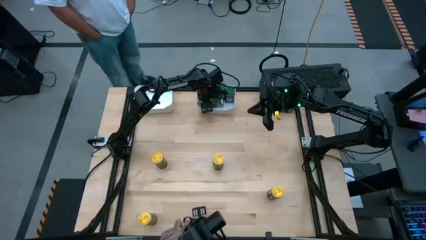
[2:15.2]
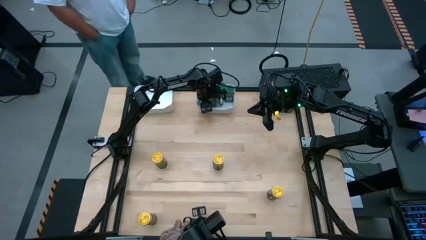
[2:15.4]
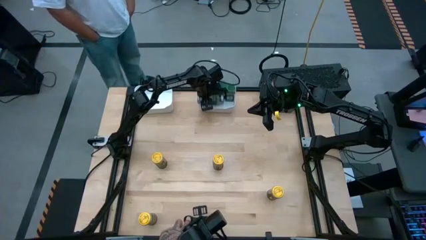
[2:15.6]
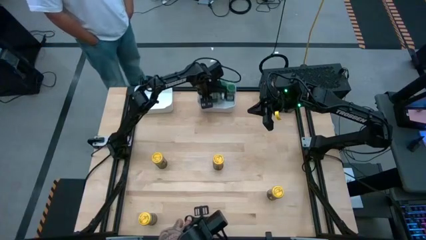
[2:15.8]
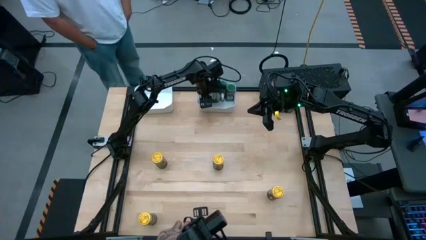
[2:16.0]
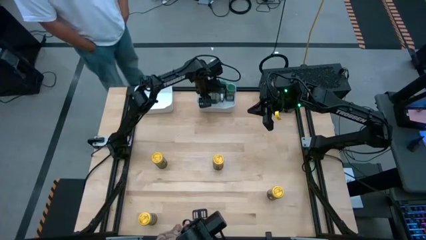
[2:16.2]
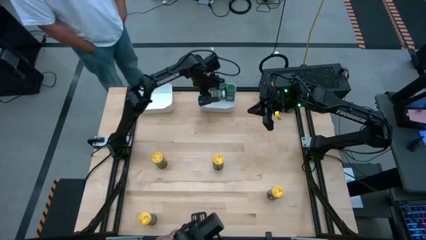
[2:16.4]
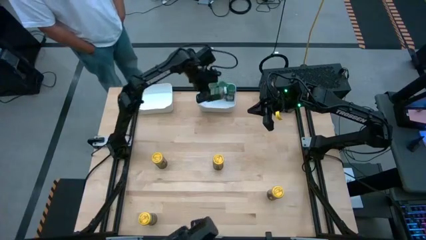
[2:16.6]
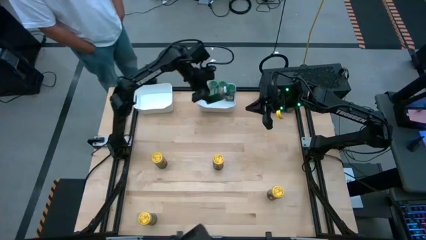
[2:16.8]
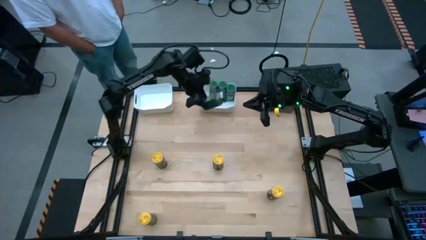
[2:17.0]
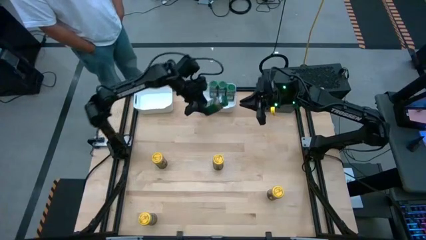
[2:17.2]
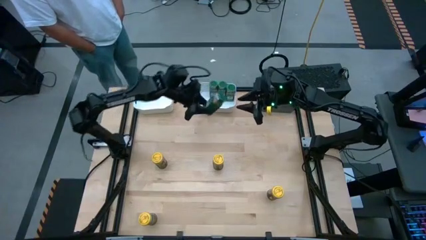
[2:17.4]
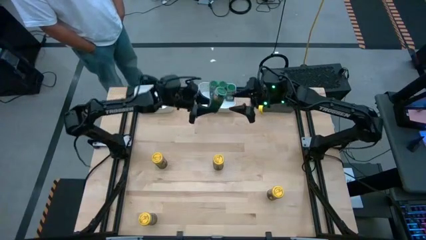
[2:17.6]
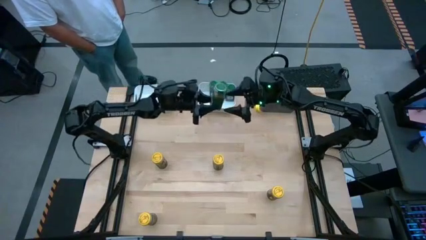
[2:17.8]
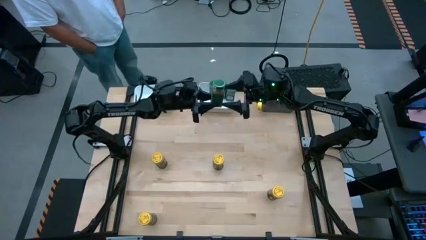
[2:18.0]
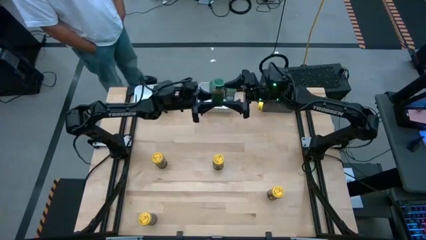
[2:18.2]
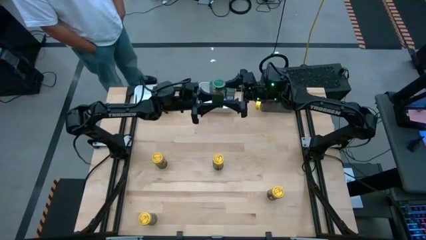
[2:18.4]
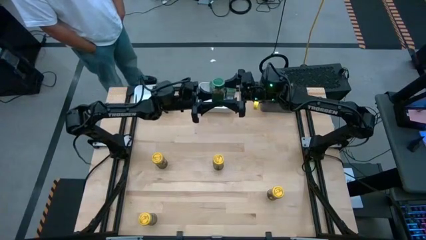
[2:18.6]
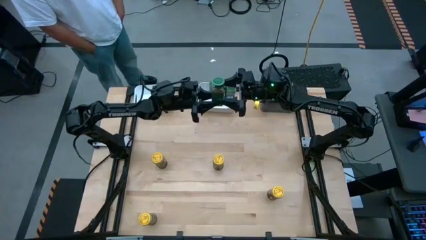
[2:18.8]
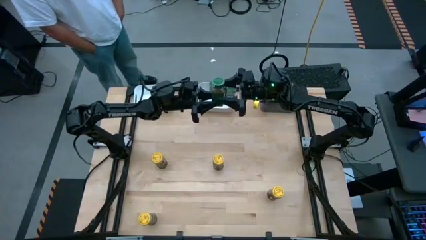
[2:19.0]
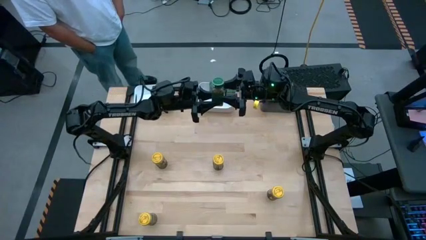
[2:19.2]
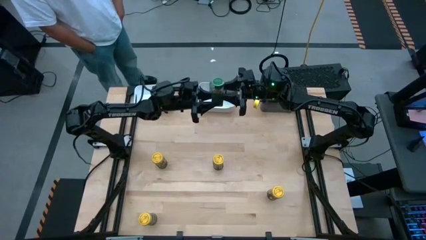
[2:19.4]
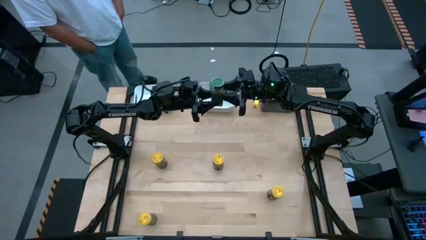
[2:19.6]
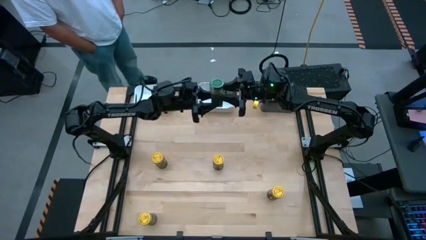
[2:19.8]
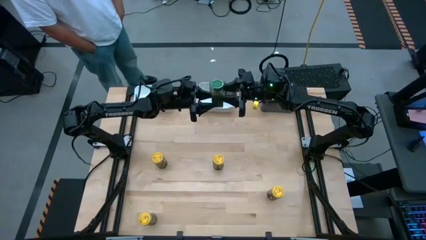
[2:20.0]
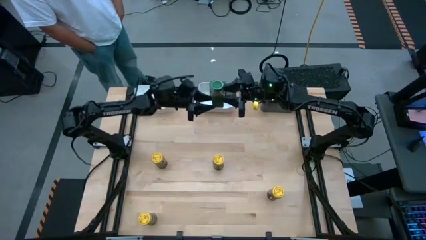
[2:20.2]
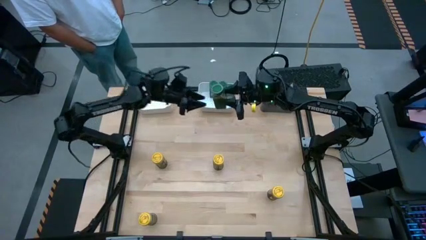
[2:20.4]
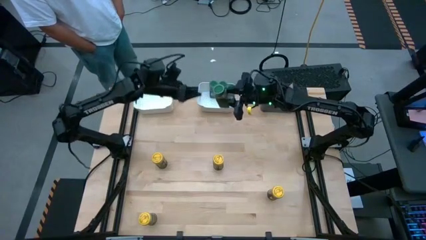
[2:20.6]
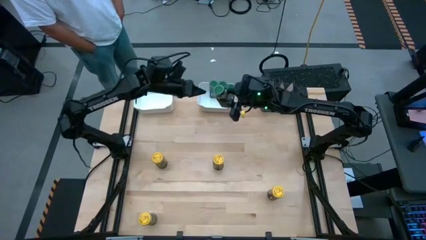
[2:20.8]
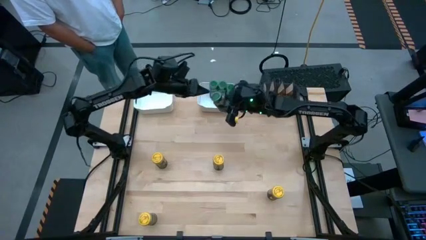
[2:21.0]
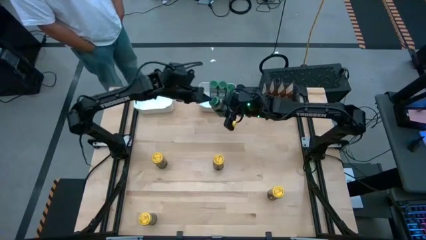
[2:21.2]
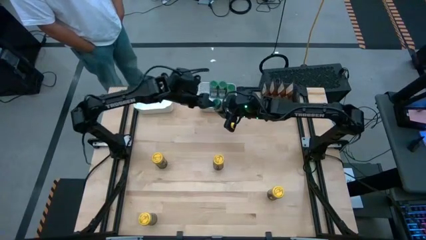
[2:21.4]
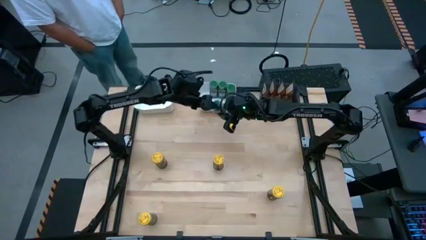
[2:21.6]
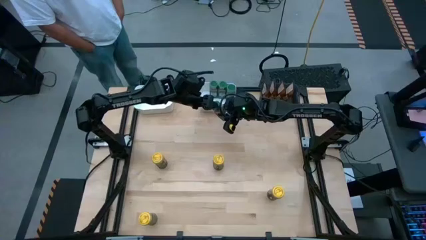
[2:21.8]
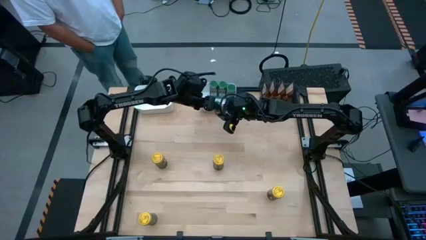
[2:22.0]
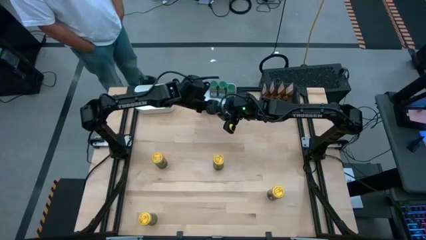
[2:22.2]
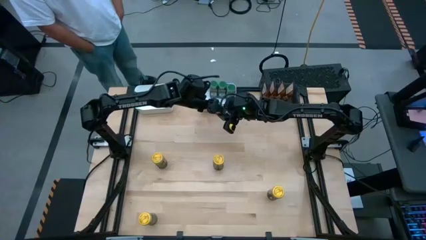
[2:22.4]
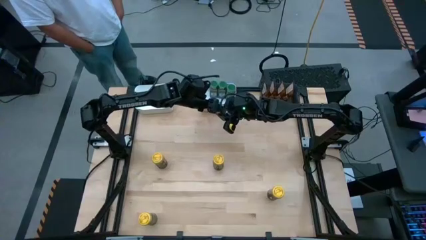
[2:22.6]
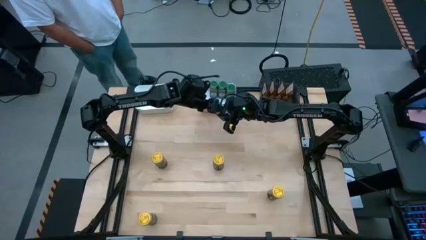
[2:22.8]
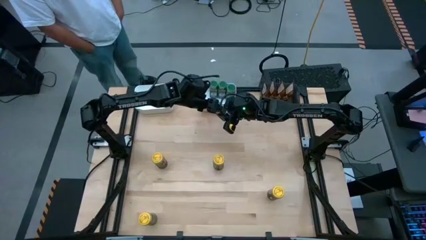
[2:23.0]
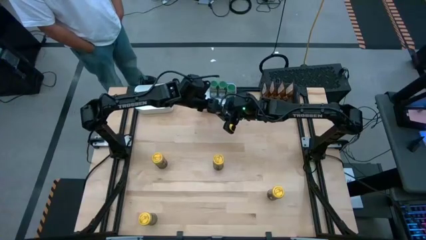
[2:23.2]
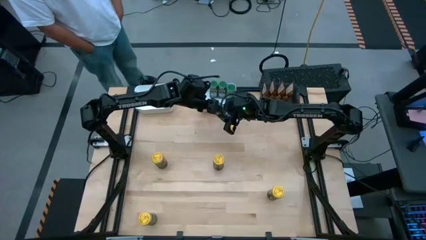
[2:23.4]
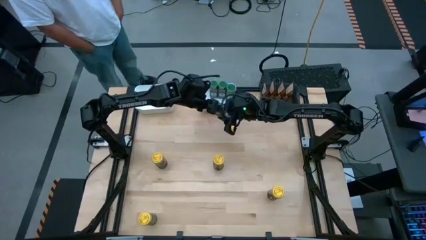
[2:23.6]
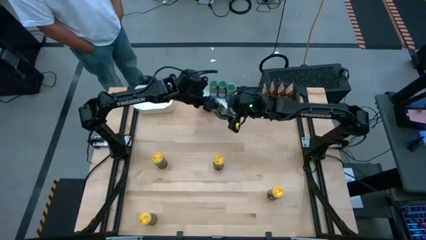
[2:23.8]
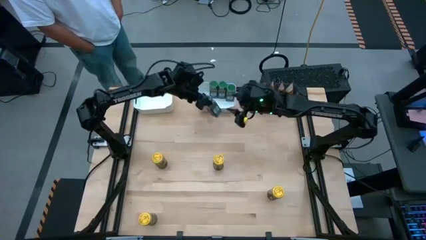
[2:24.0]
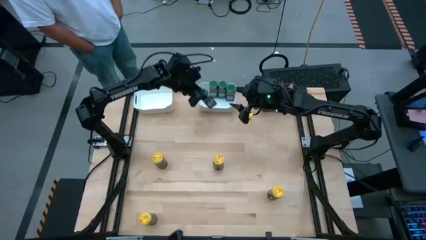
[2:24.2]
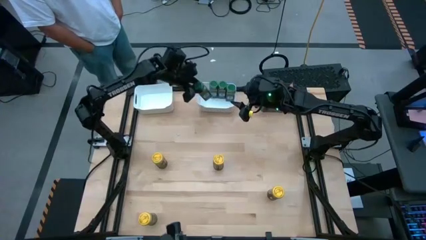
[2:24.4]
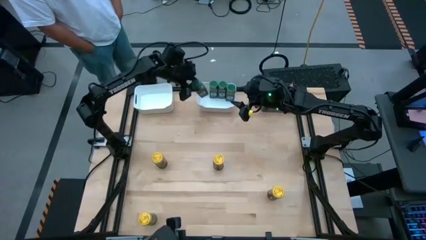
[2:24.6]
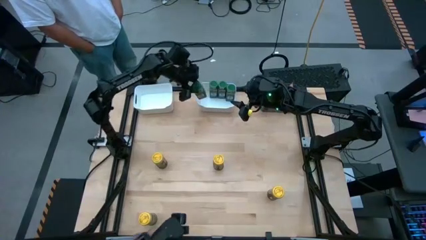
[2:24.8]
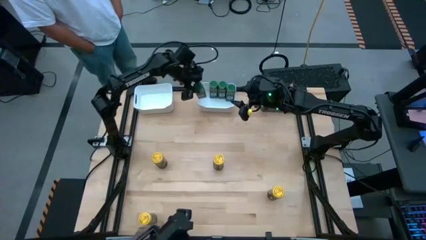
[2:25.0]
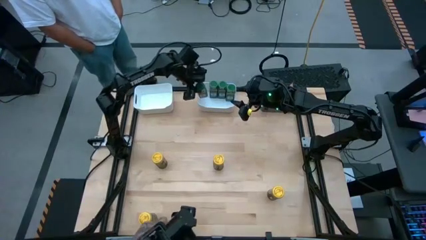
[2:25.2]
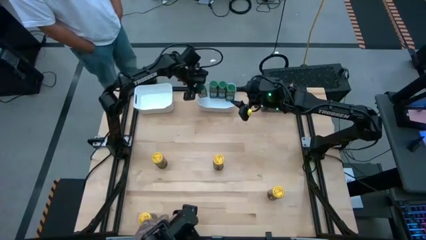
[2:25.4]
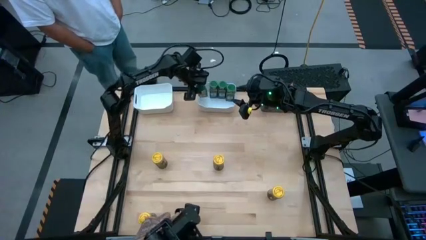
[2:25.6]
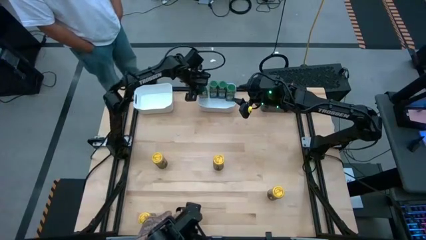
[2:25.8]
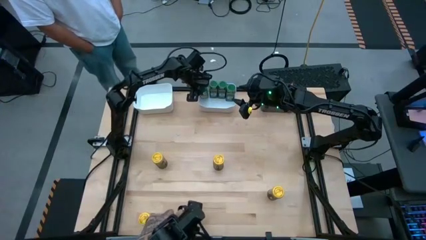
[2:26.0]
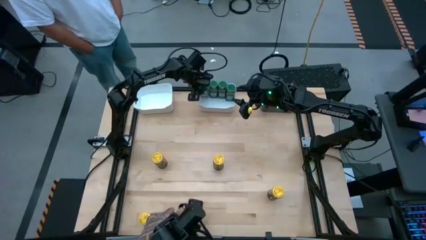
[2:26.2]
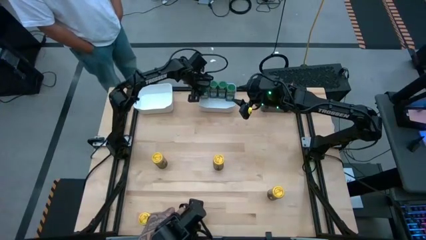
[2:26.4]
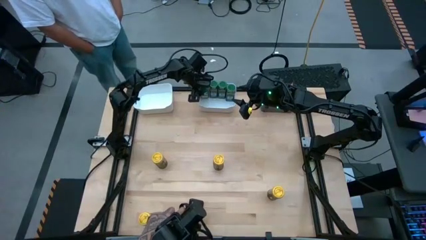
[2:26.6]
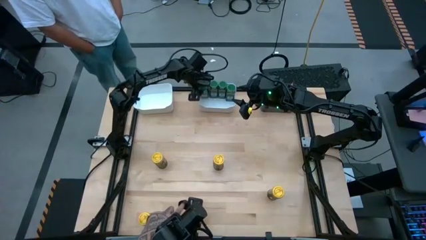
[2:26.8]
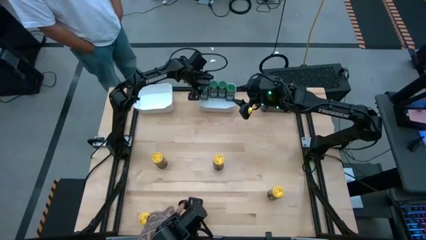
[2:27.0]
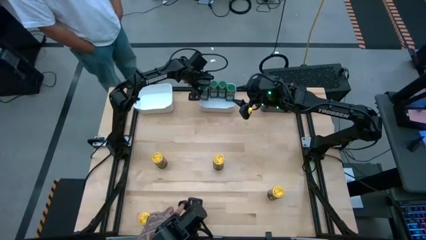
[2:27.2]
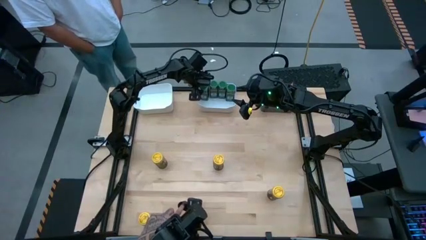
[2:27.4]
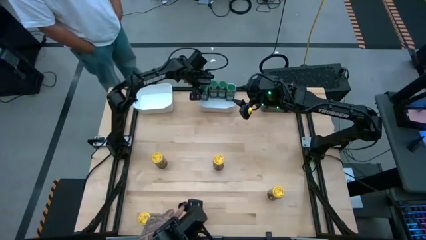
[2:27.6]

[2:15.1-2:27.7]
Task: Sort spices by type
Put the green seasoning bottle into the right white bin

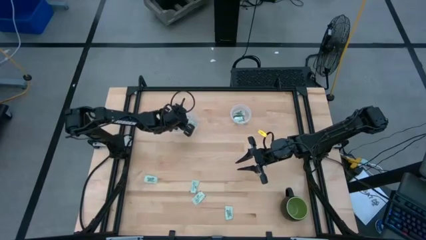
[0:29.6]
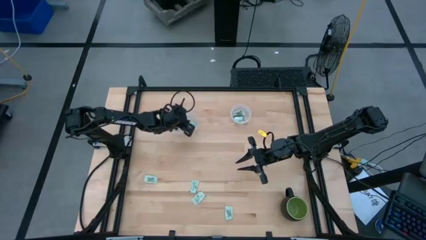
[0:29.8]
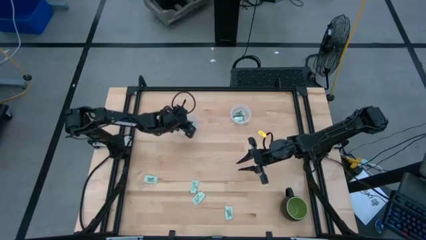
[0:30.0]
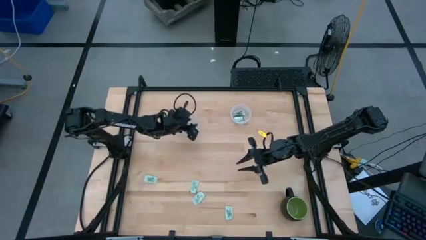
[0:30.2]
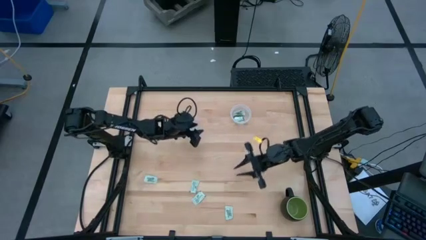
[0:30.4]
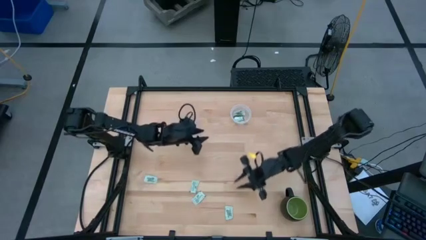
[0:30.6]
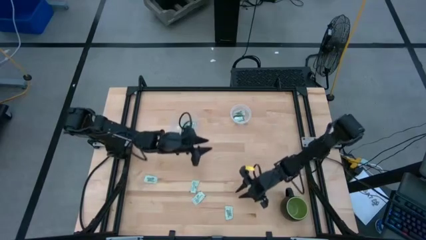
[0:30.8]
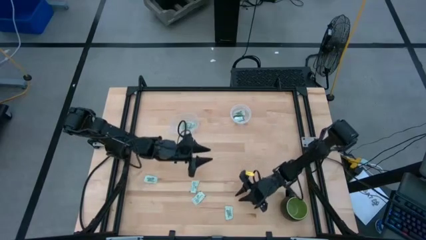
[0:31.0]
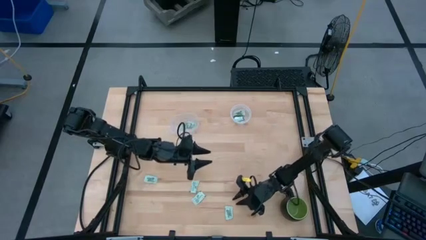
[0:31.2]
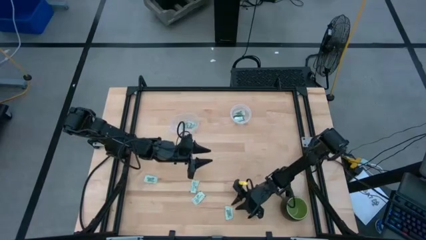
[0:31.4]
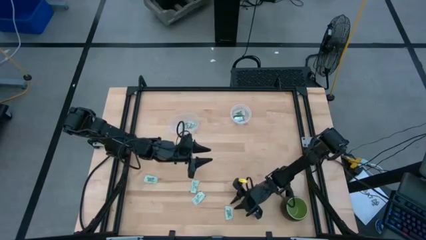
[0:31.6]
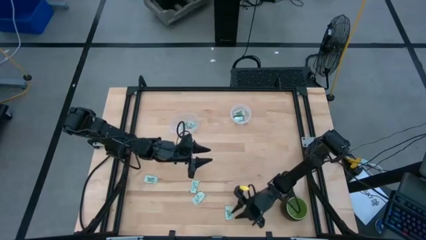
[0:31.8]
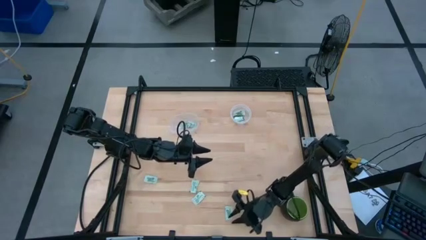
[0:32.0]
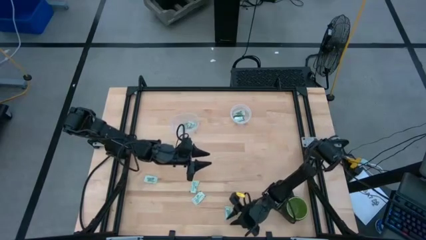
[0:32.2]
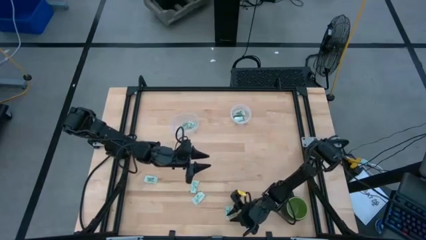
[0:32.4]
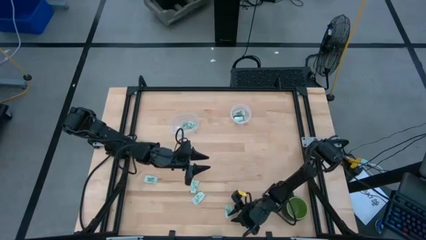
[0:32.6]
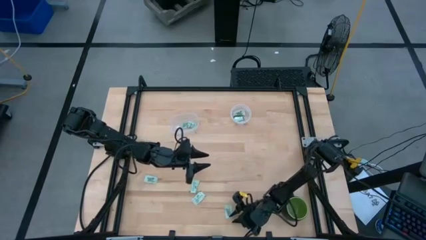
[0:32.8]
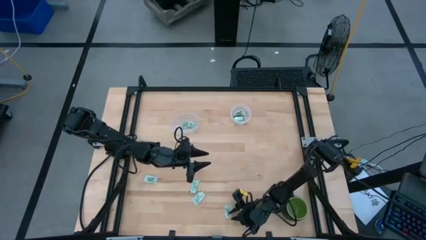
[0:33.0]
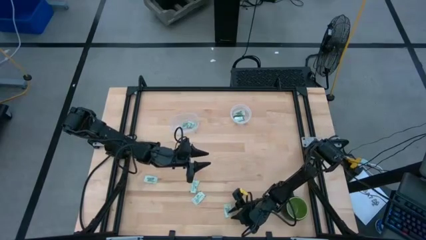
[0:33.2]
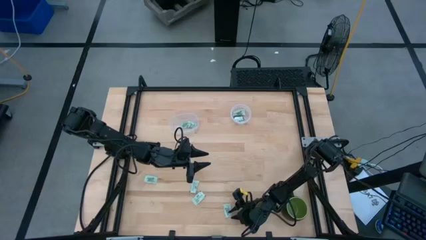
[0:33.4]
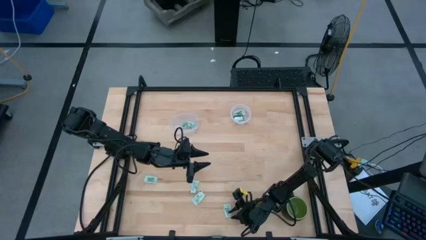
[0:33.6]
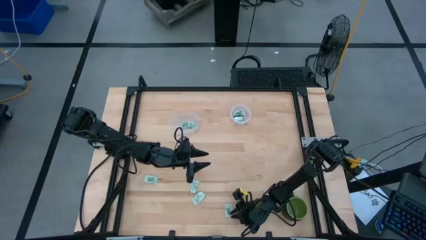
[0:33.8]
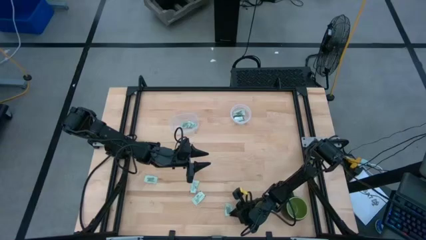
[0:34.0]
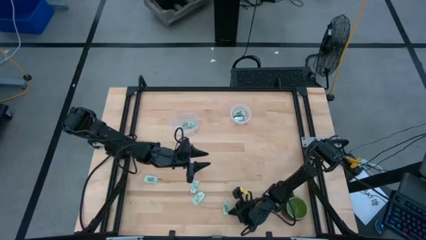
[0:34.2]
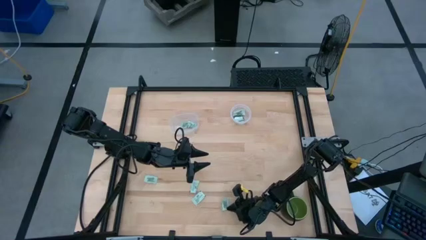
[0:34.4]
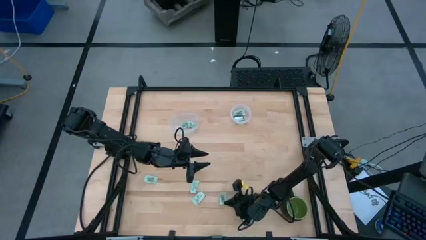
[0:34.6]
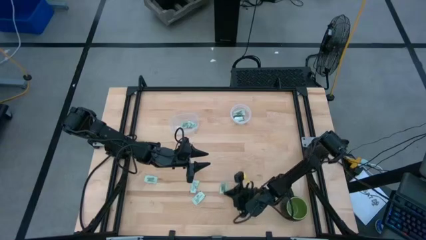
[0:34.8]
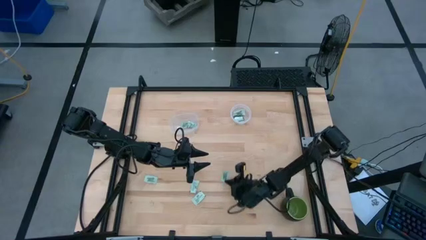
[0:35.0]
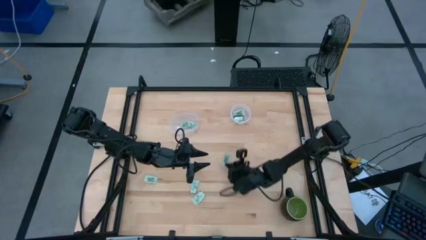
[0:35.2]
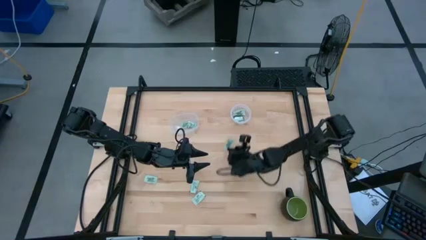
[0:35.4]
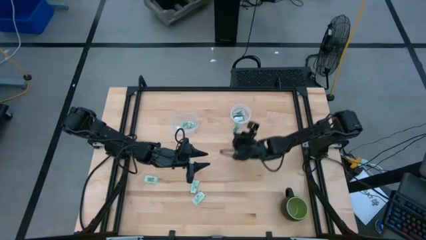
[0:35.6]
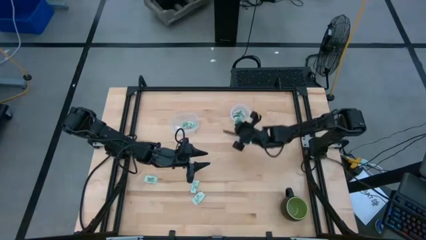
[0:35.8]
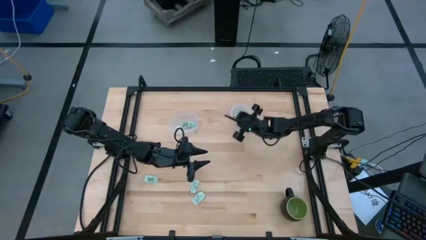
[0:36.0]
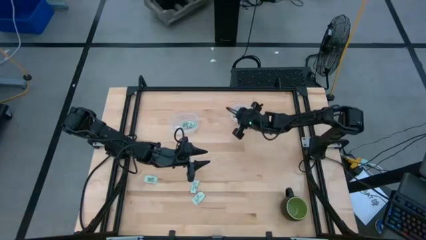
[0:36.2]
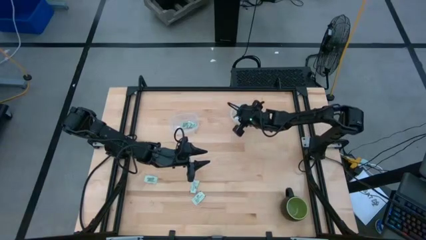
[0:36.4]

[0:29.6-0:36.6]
Task: Pick and place Stevia / Truvia into bins
Put the stevia packet into the right transparent container
